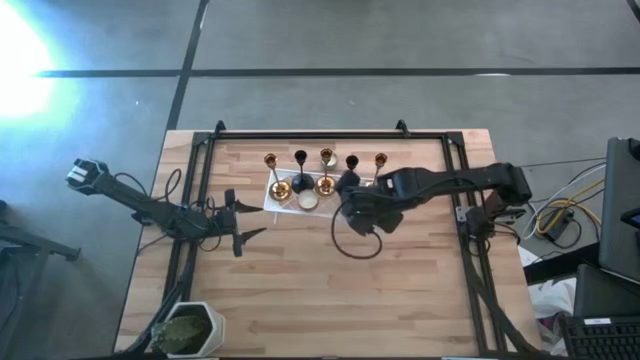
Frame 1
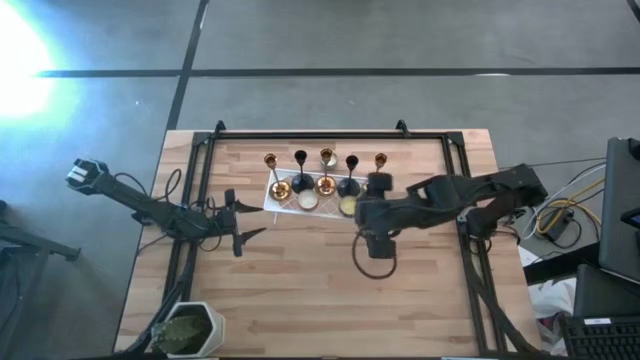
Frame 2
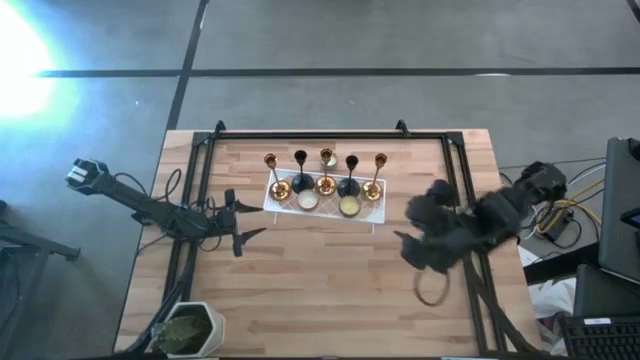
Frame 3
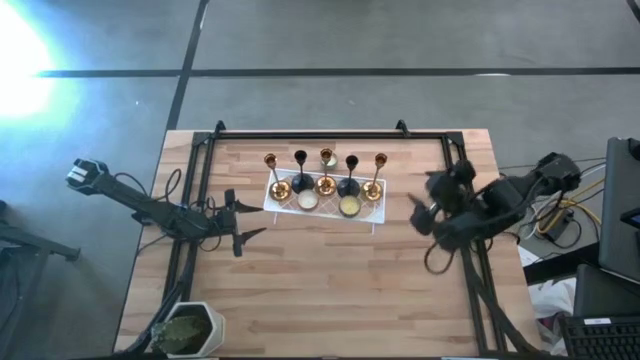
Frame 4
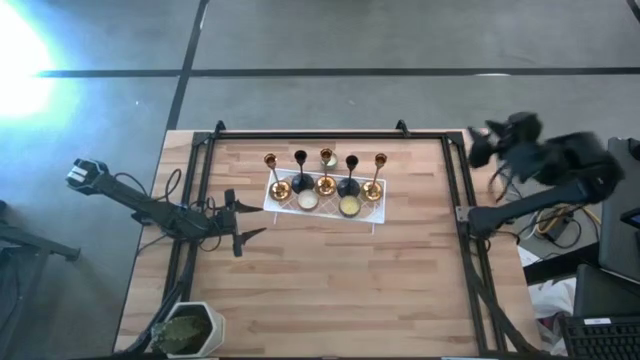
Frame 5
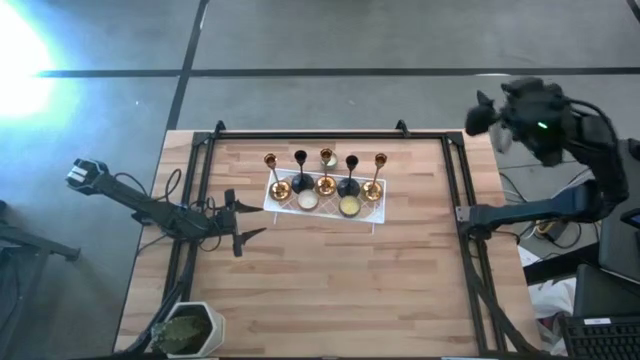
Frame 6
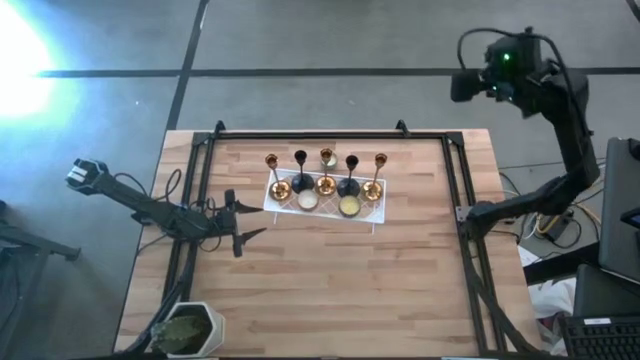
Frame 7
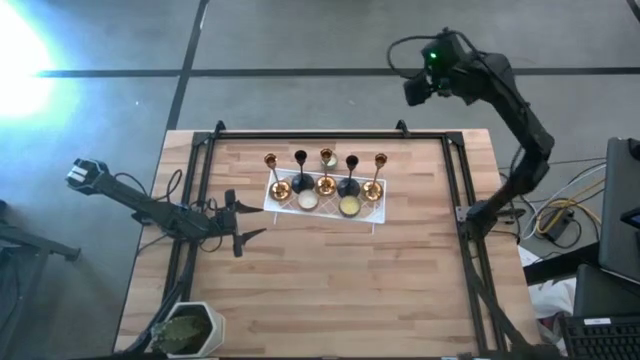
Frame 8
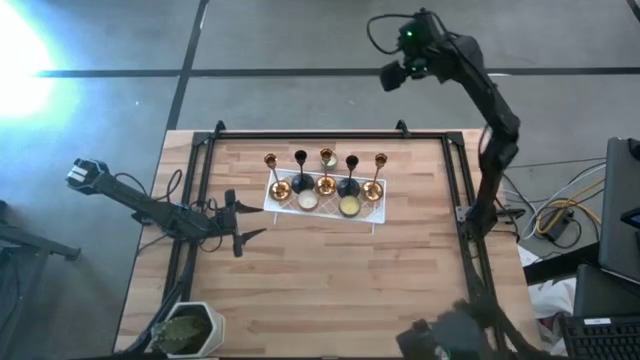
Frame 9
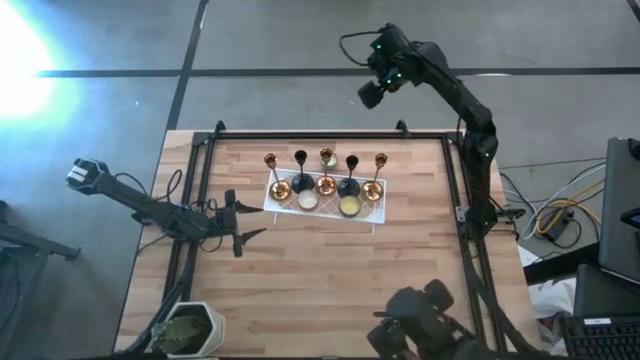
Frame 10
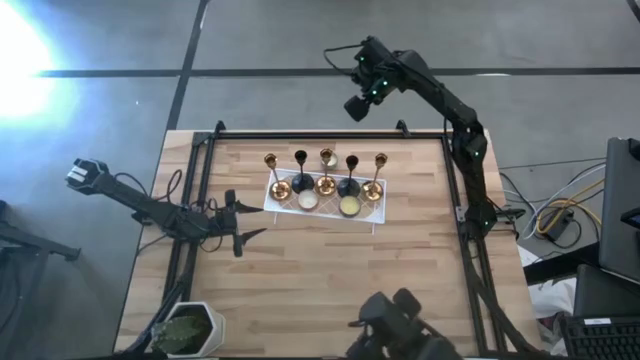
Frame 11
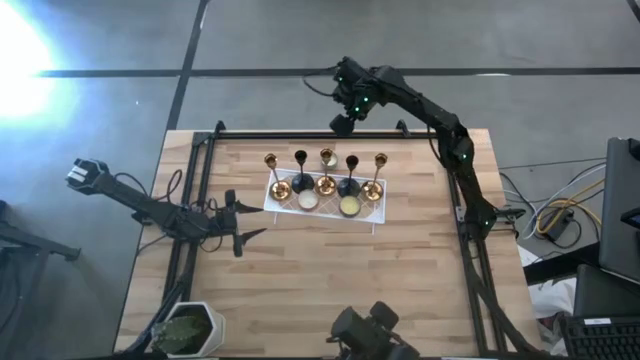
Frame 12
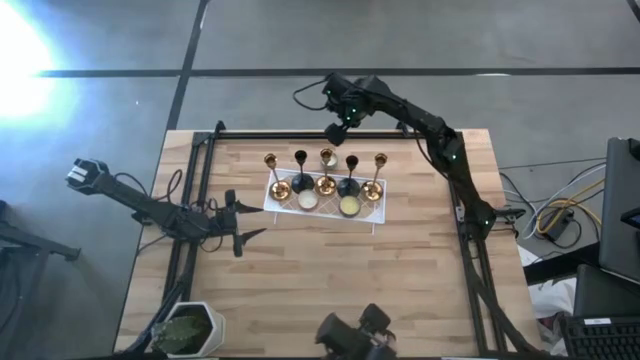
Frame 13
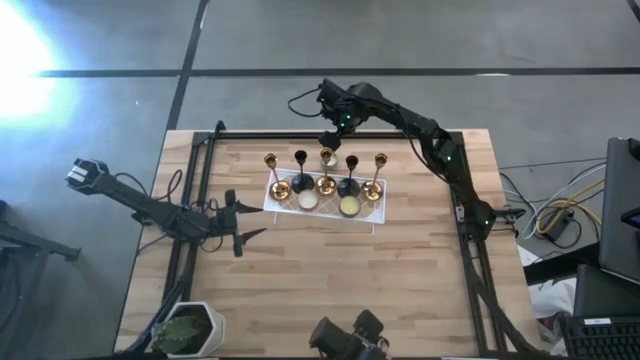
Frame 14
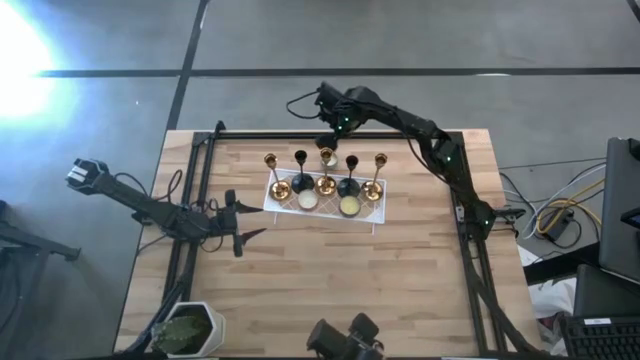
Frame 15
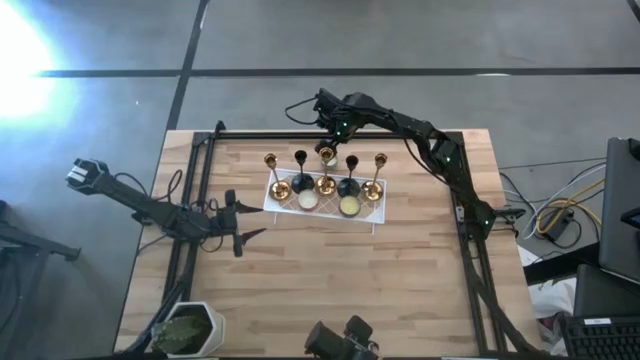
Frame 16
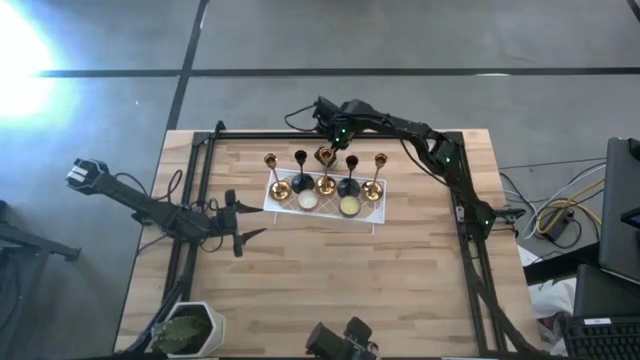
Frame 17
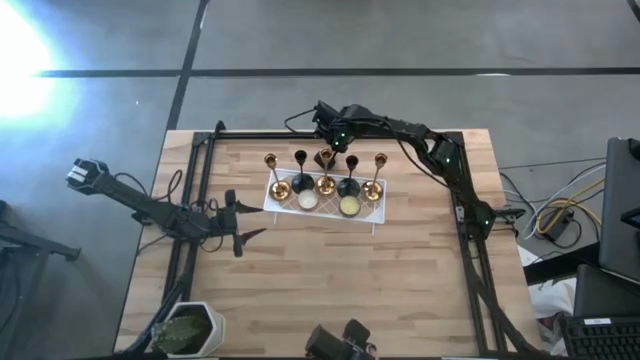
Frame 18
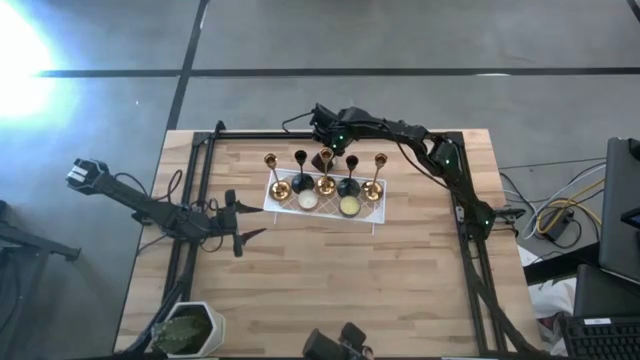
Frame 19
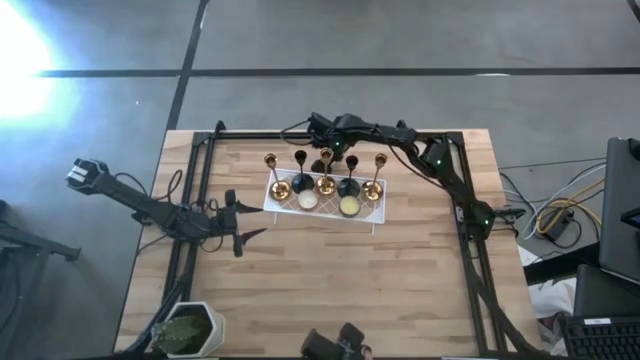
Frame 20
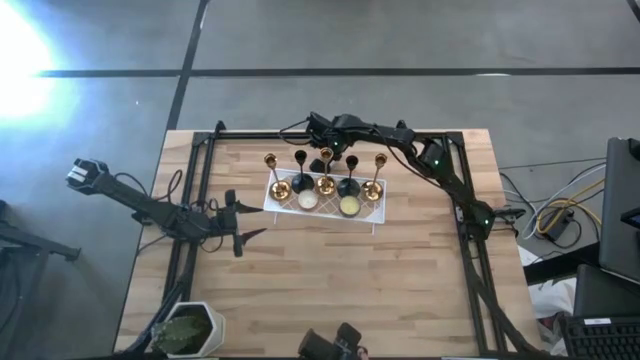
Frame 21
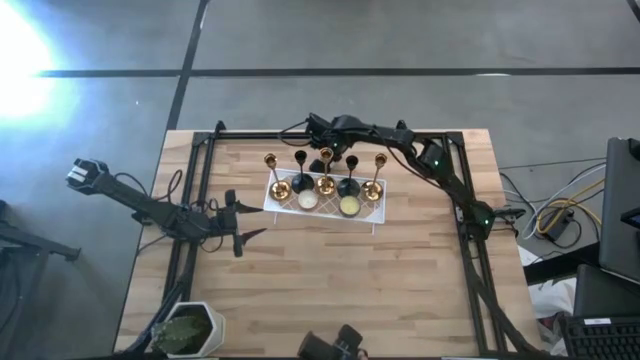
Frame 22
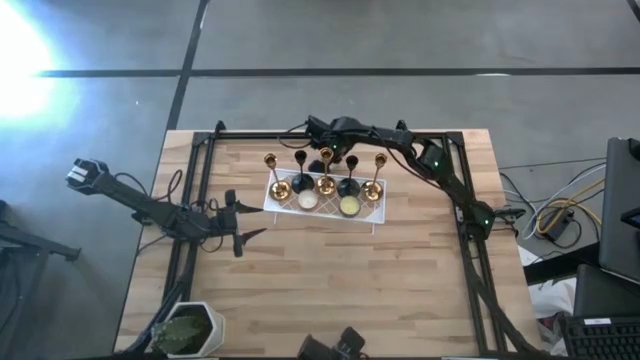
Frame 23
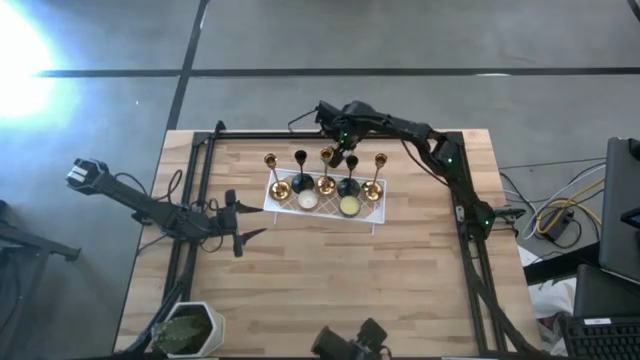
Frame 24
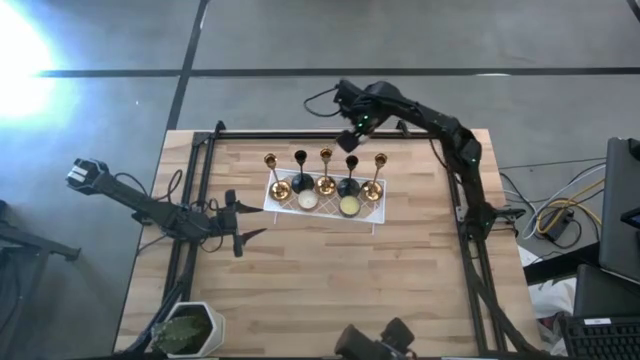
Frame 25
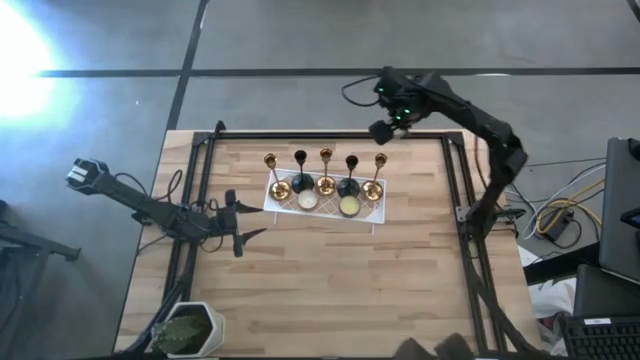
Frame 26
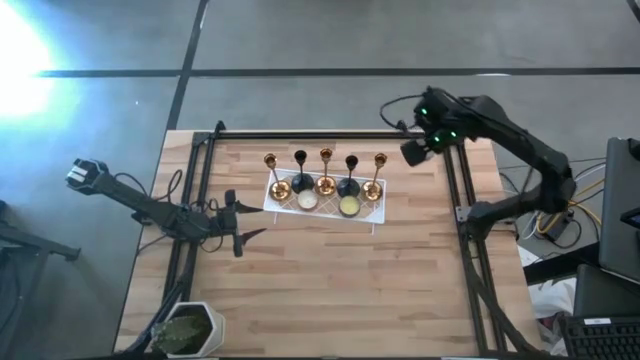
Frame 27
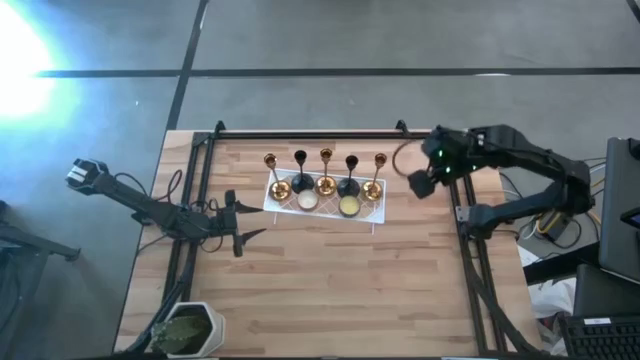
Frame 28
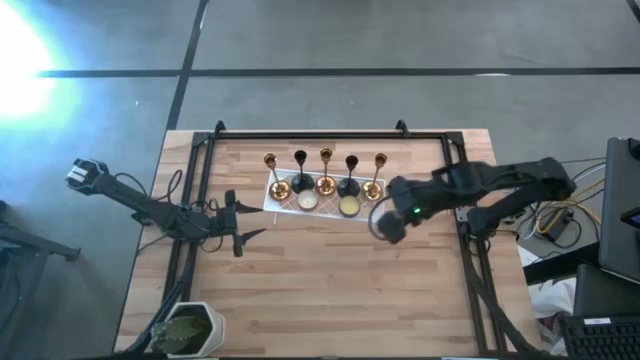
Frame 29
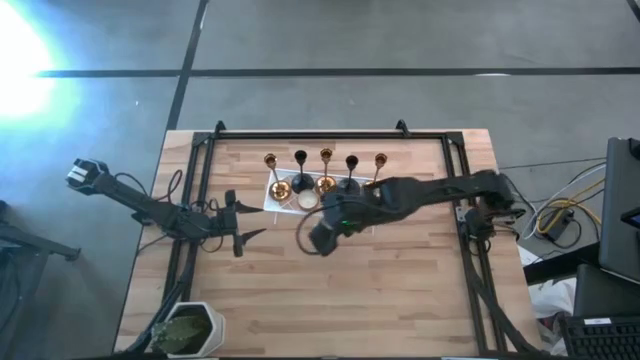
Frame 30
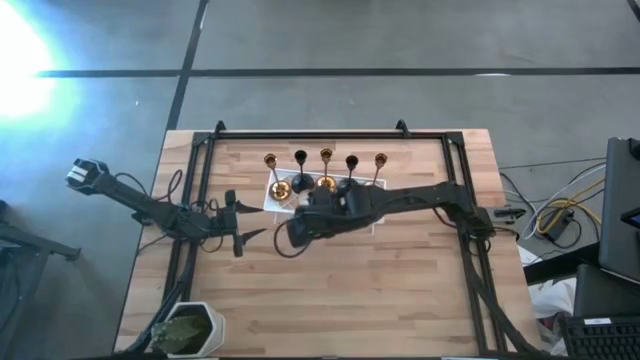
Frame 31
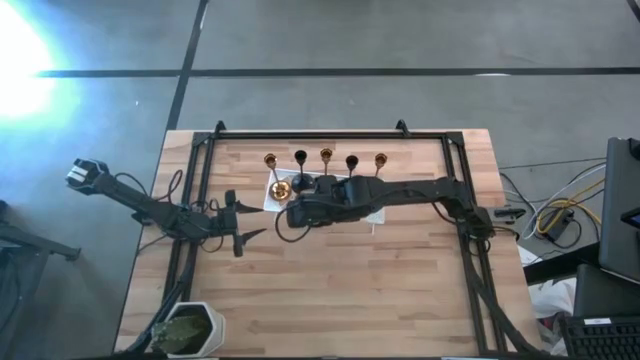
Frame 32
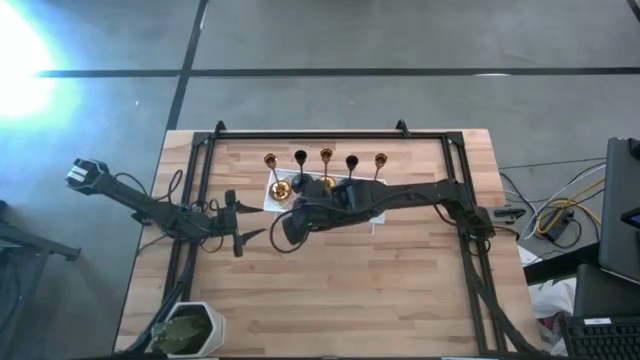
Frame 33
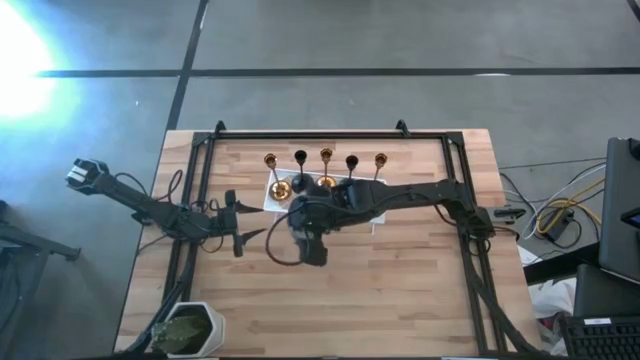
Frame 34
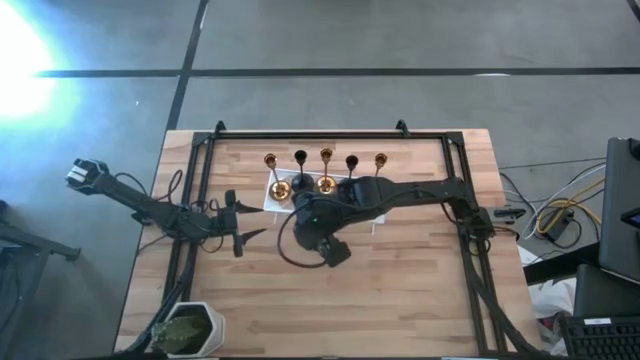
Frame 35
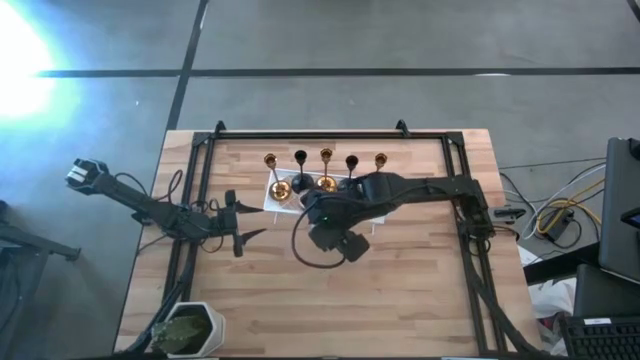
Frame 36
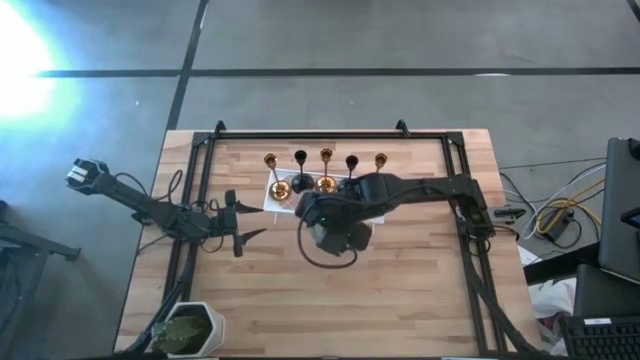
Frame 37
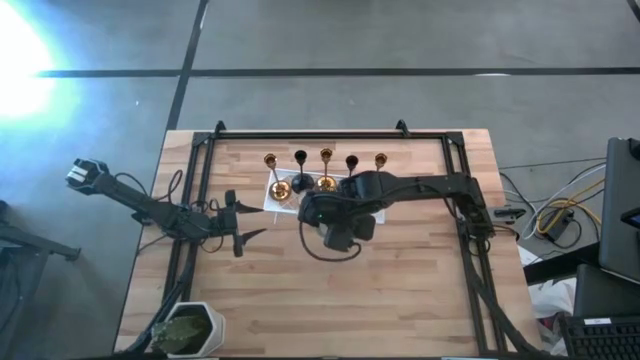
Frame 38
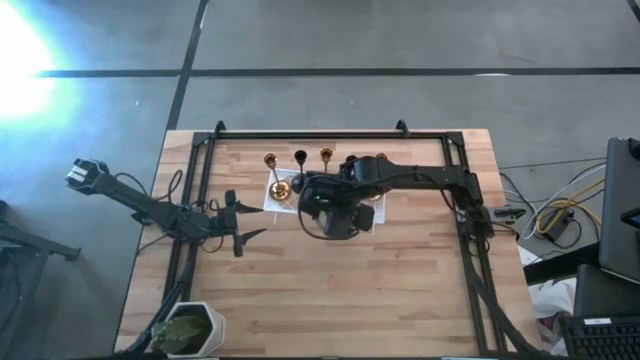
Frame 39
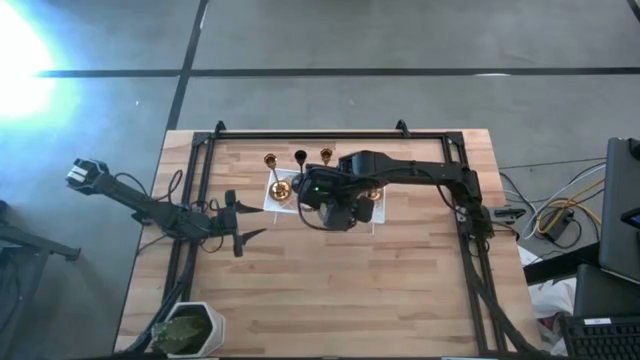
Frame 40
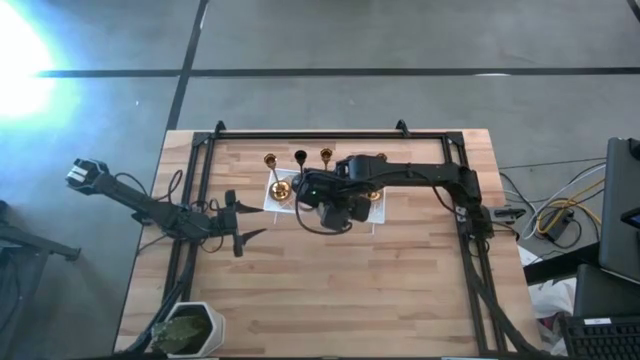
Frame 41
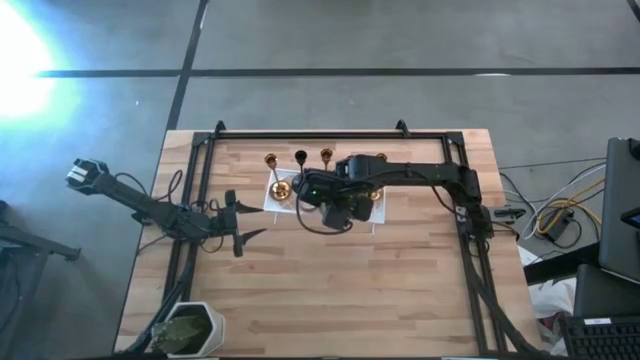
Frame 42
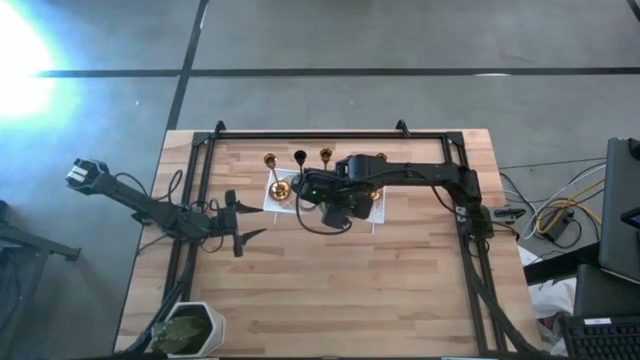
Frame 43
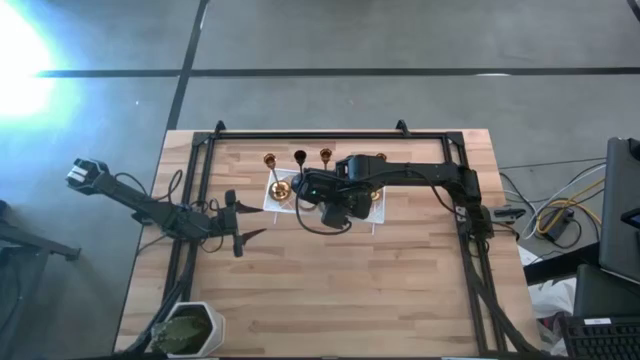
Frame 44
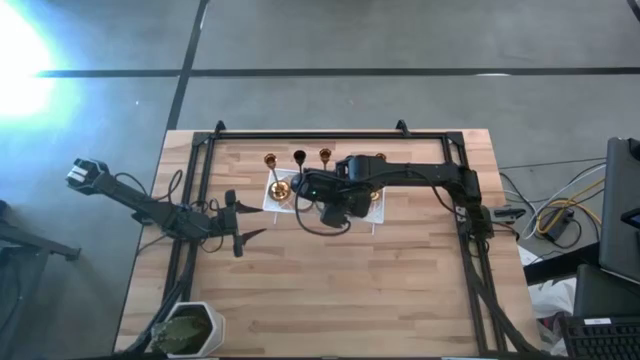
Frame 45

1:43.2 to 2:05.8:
Task: Pick & Place candle stick holders
Put the light blue scented candle on the shelf
